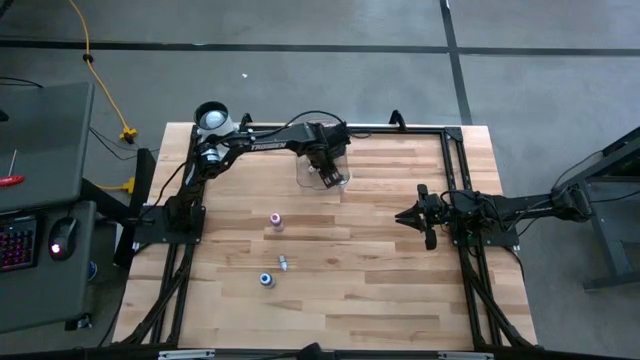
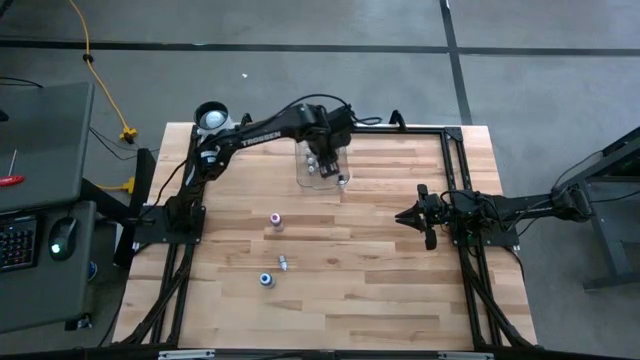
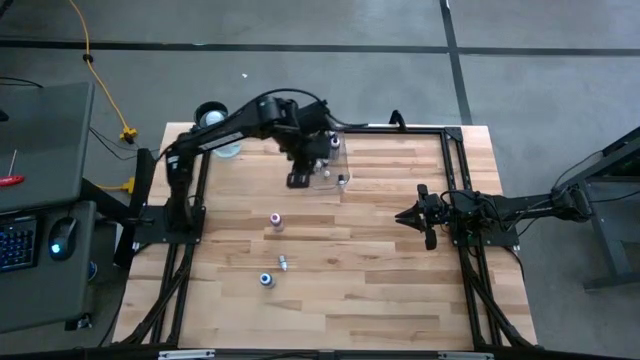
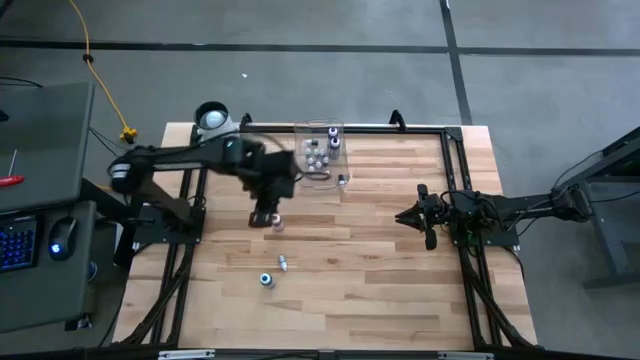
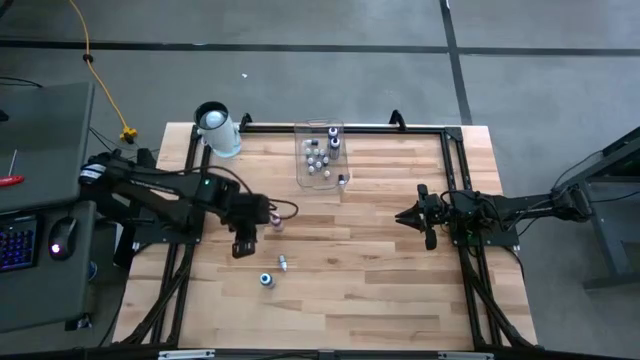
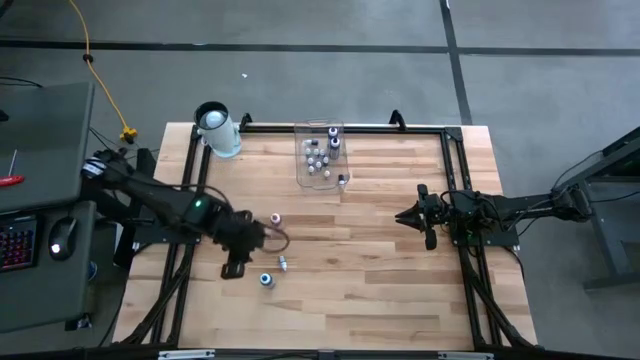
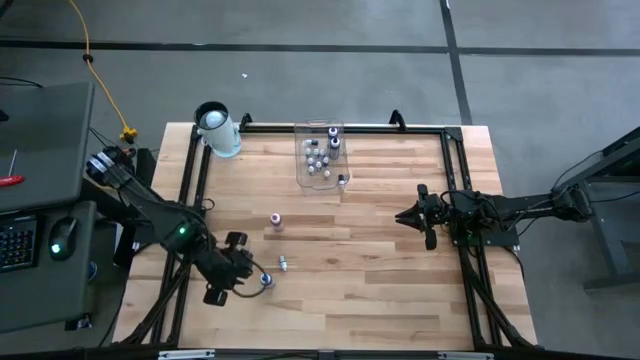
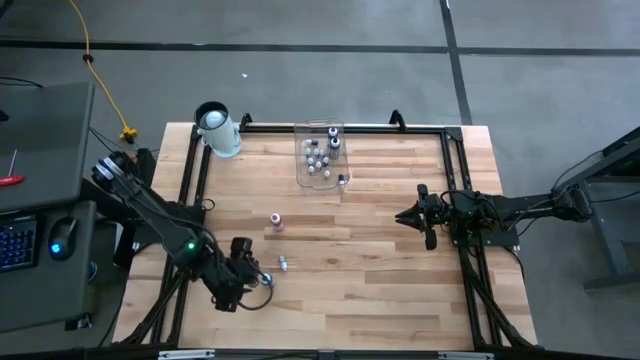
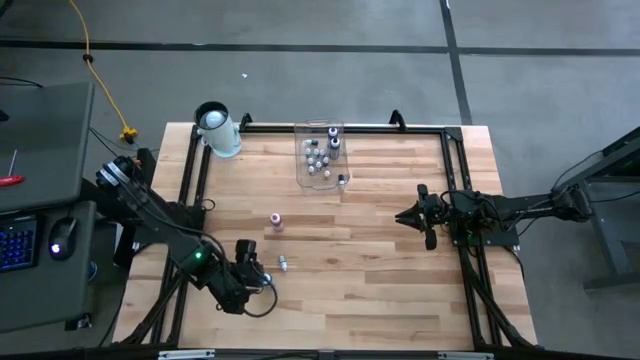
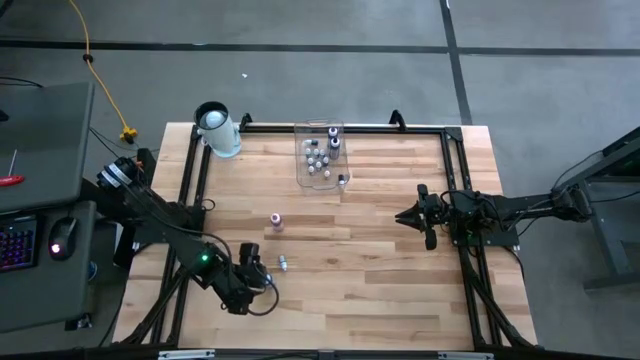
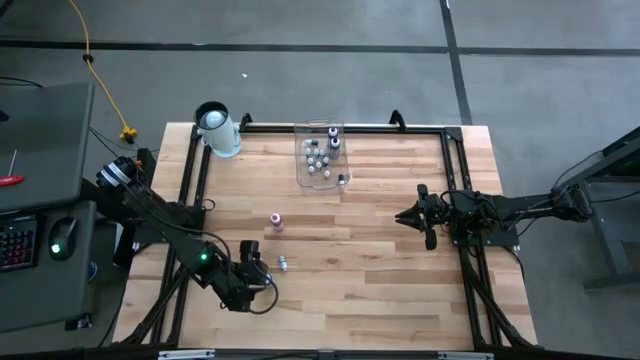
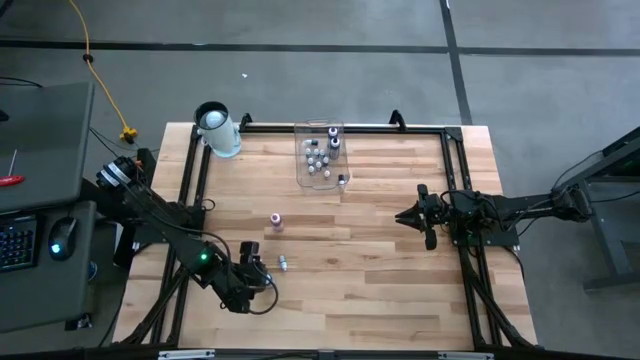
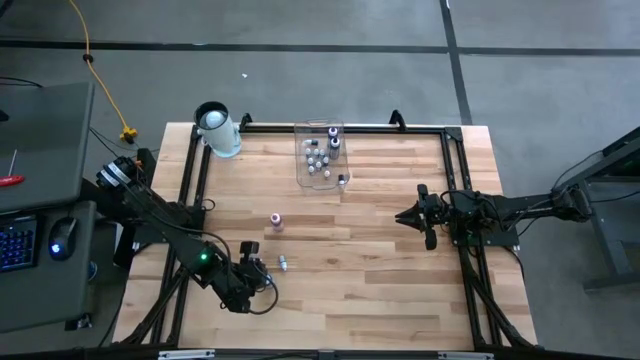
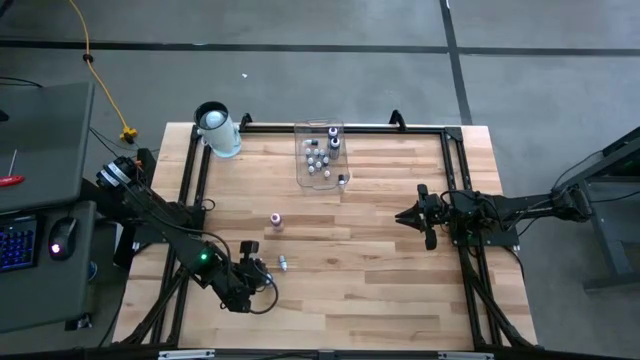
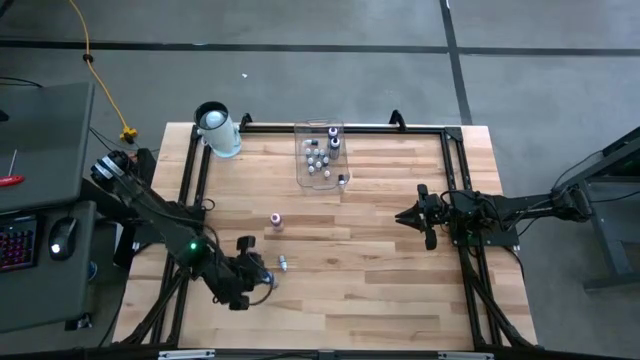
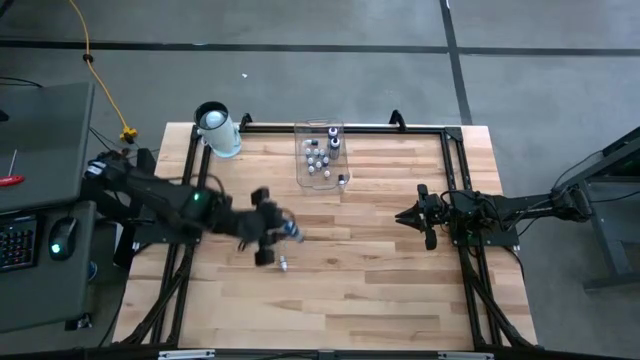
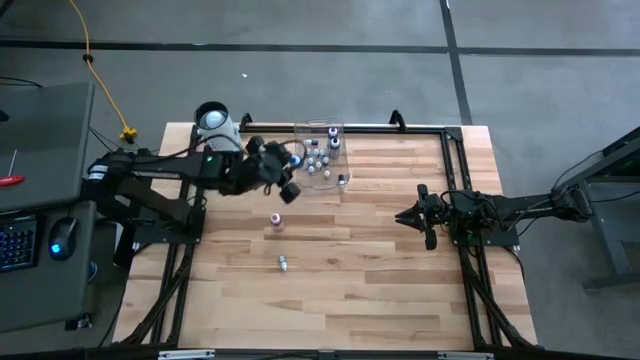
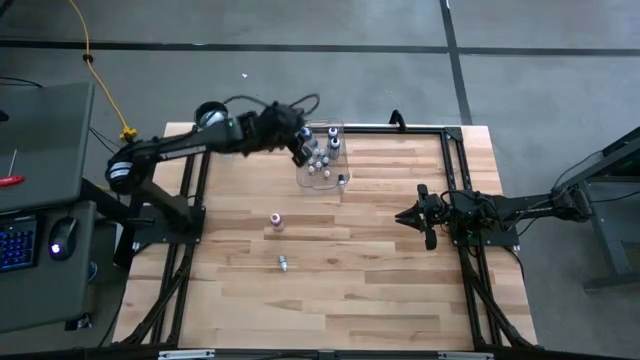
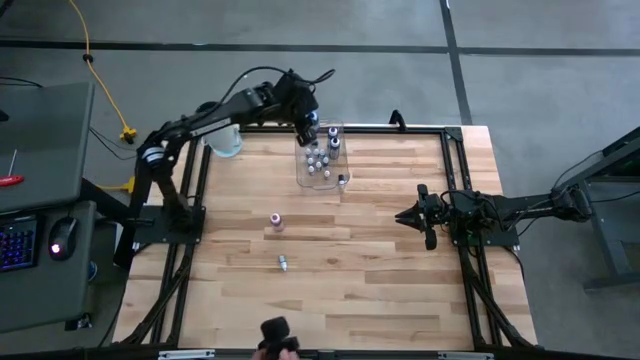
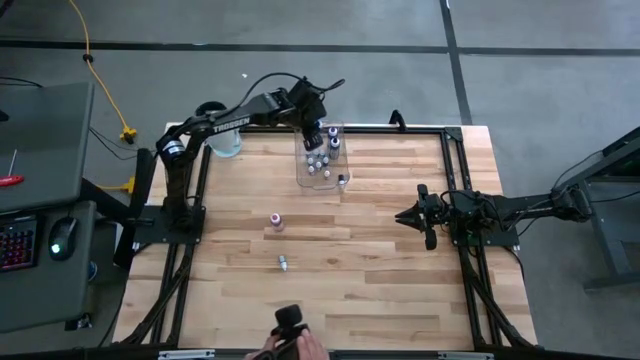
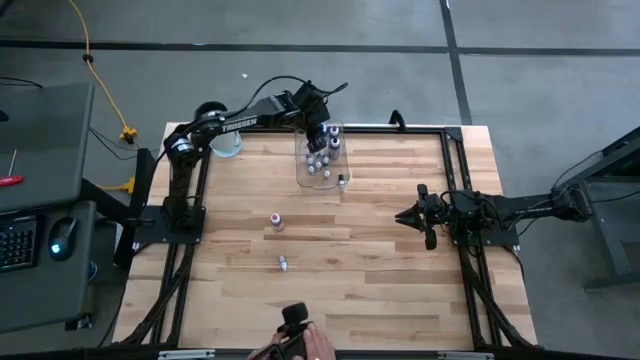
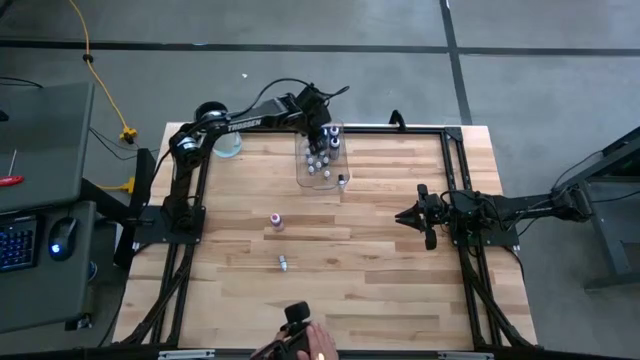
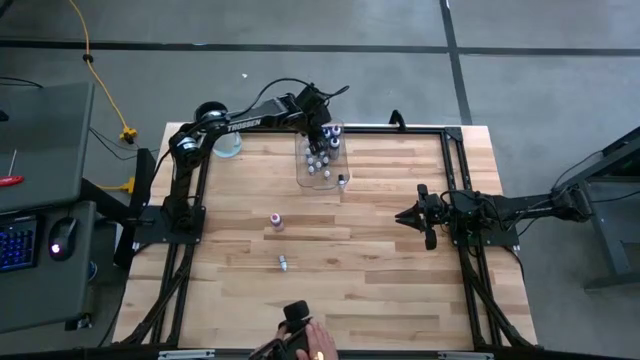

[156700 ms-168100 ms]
Task: Pick & Place food coloring
Put the large blue food coloring bottle into the container

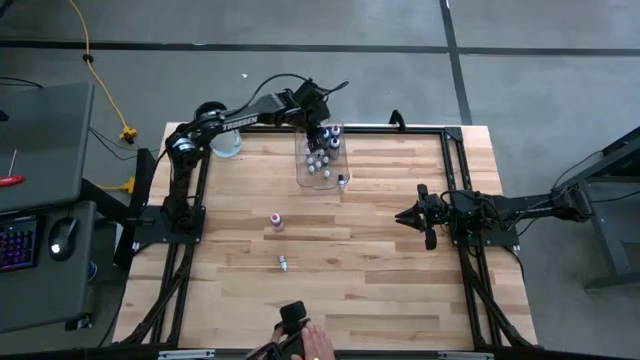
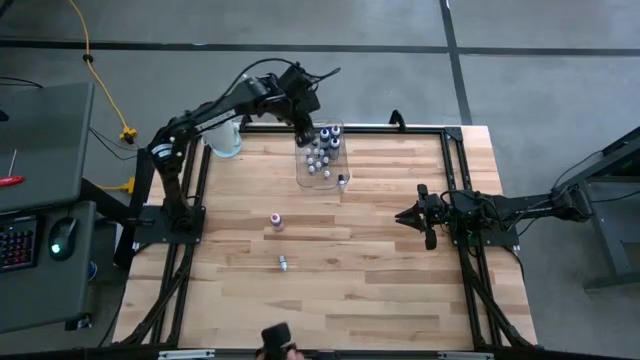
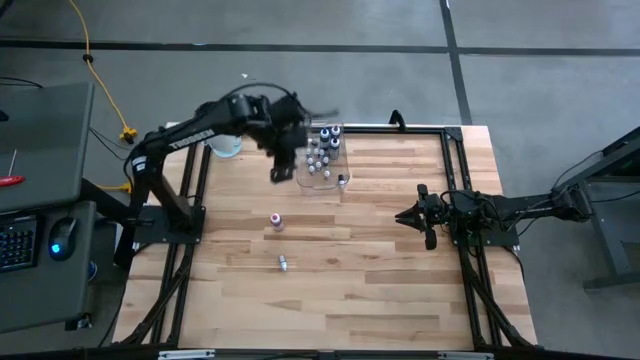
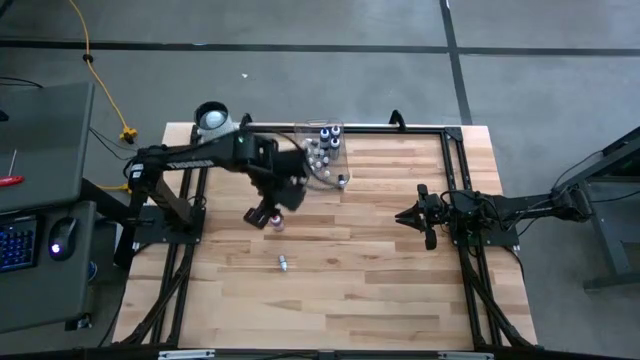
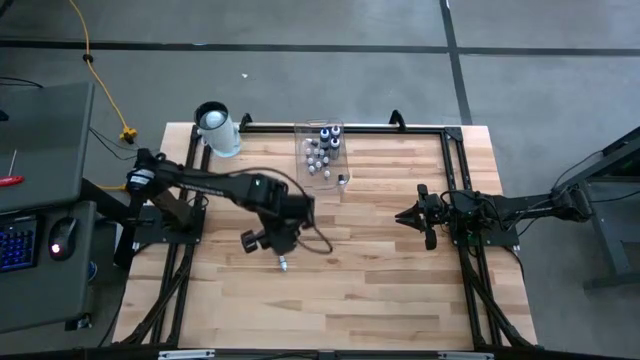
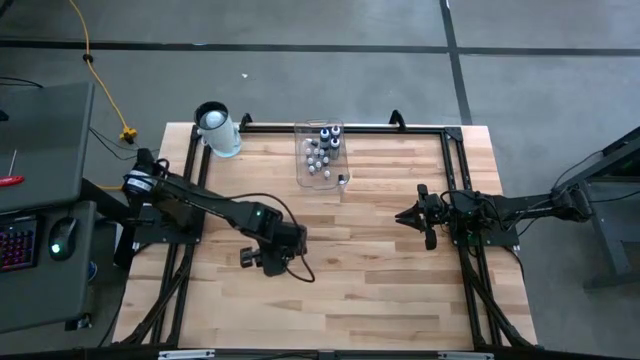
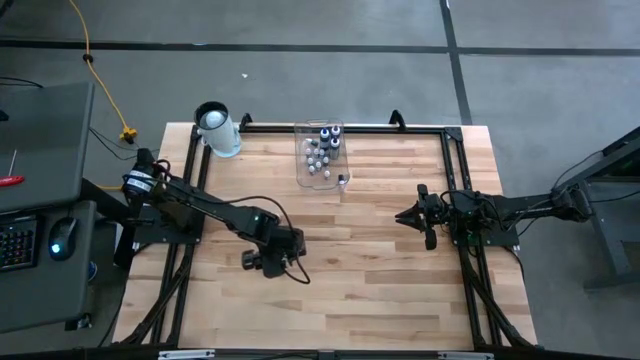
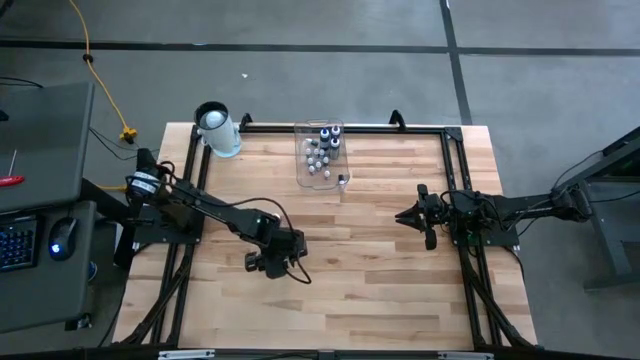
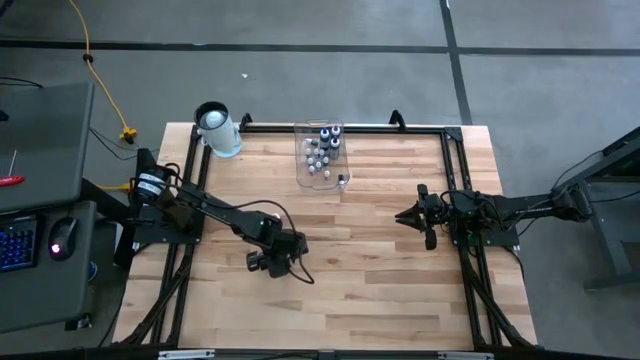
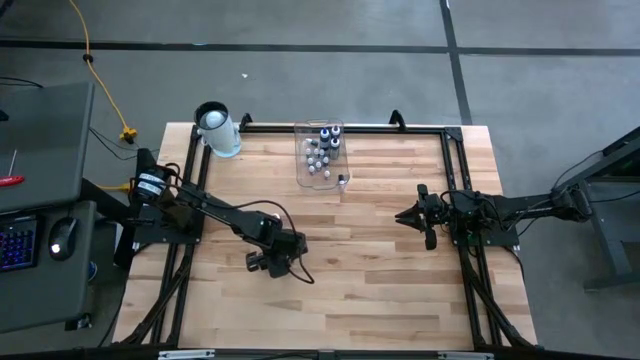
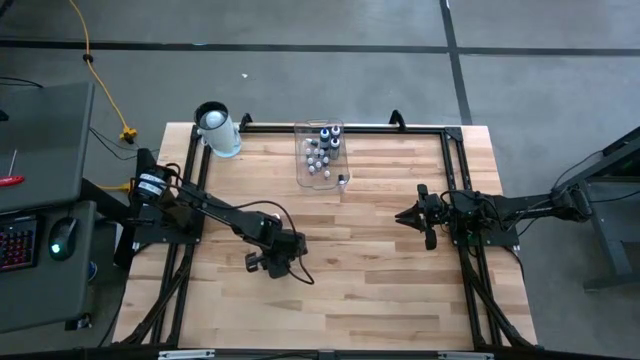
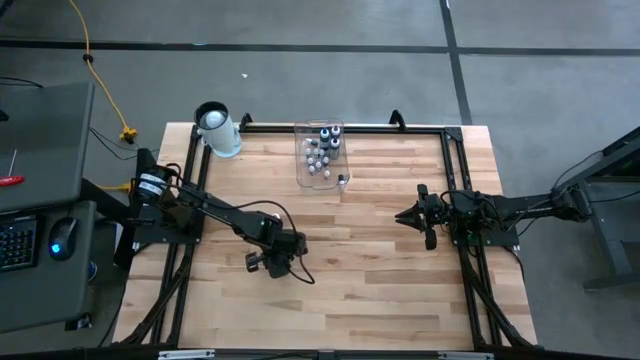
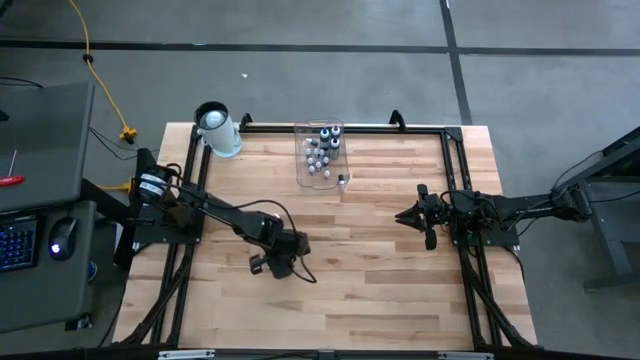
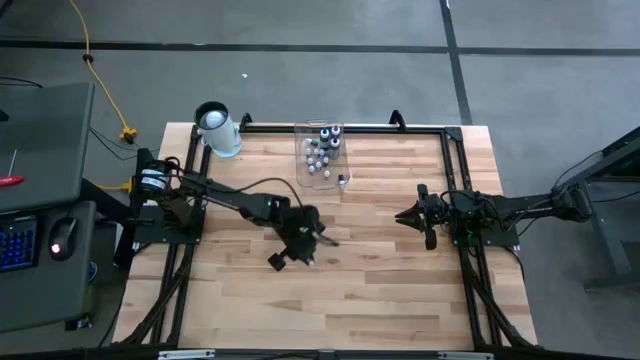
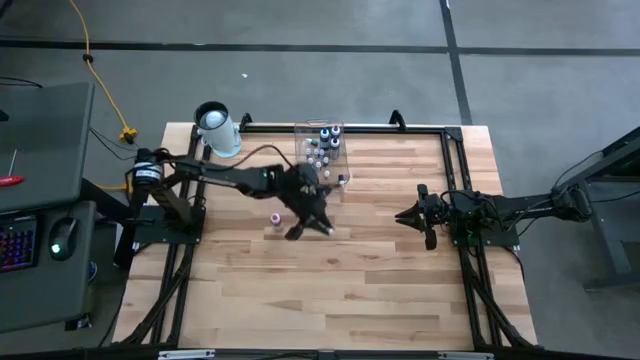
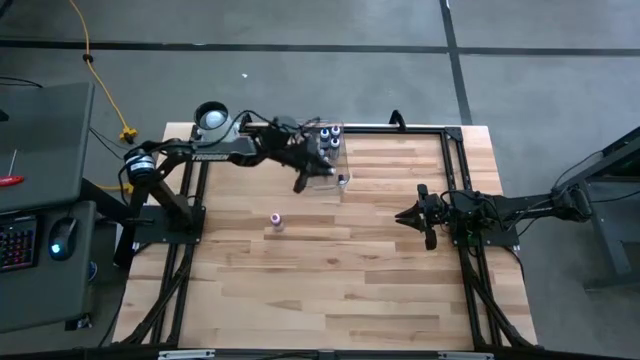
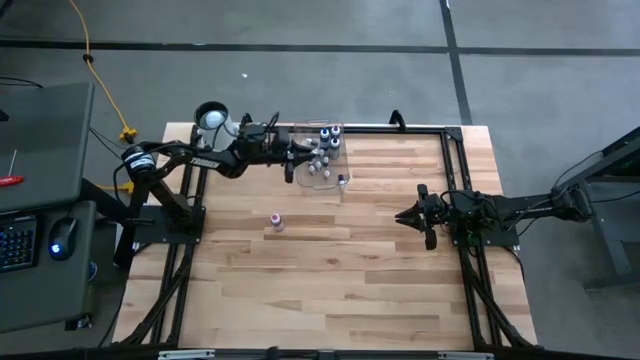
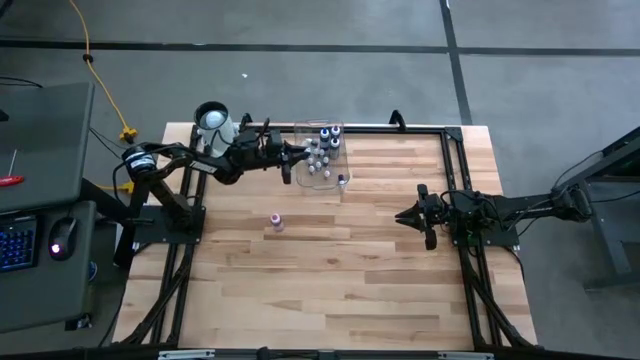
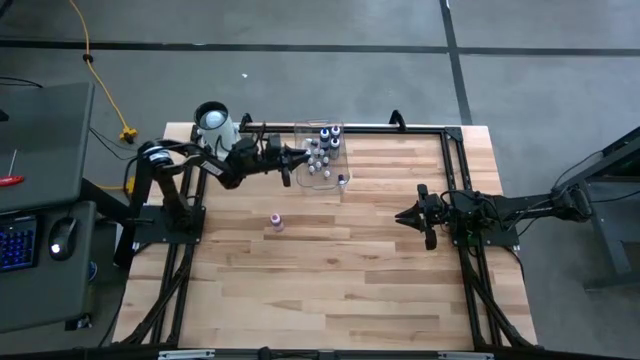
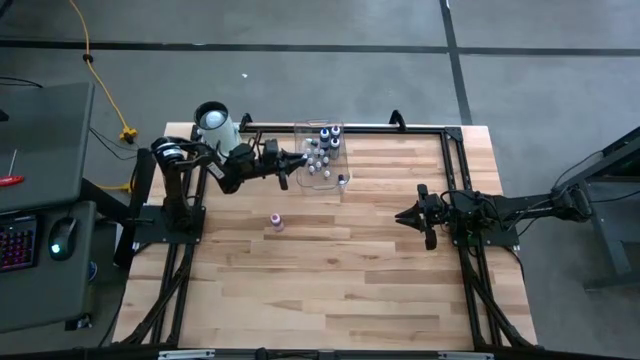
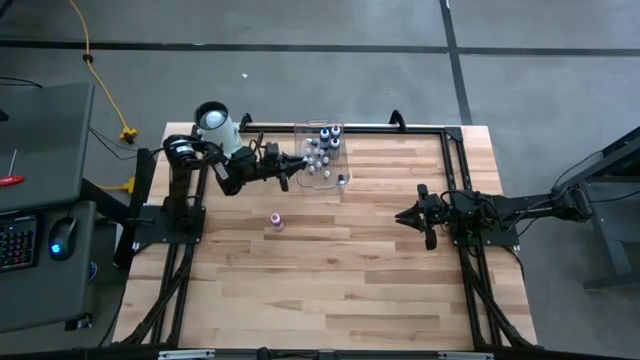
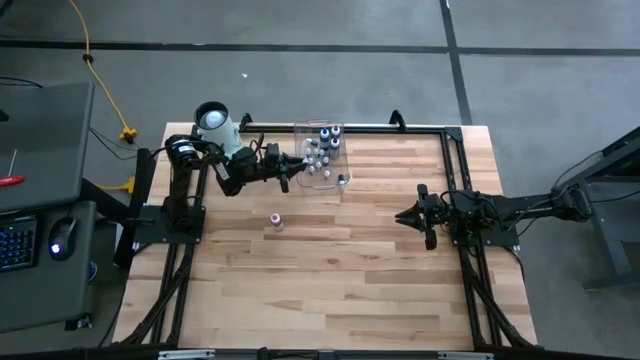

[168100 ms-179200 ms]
Put the small yellow food coloring bottle into the container
